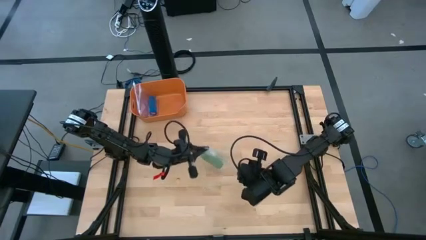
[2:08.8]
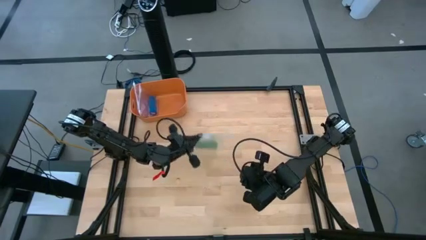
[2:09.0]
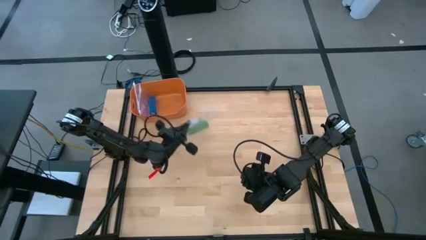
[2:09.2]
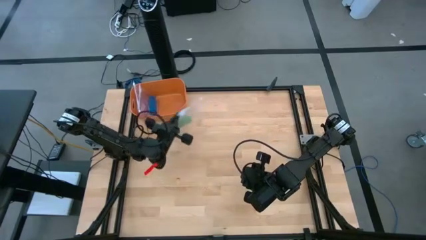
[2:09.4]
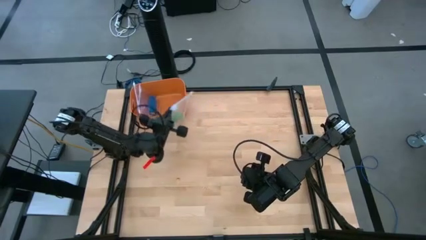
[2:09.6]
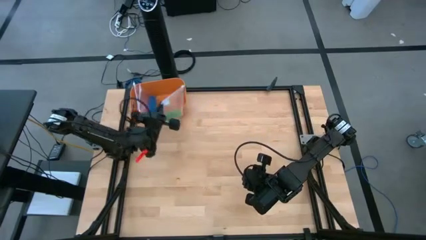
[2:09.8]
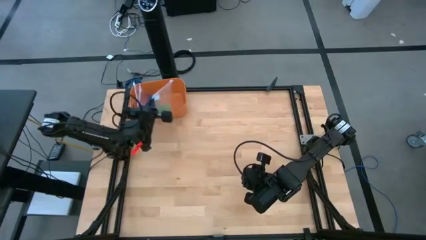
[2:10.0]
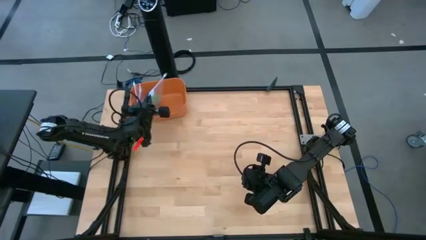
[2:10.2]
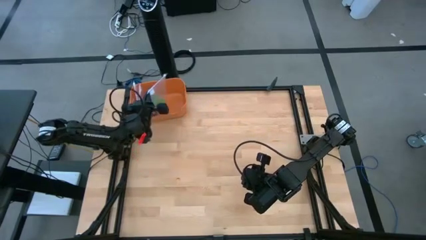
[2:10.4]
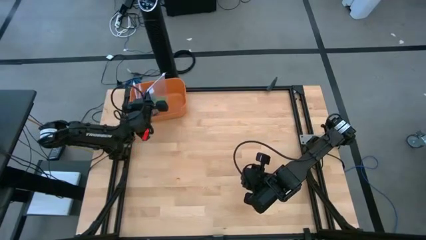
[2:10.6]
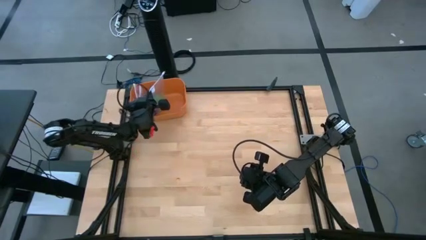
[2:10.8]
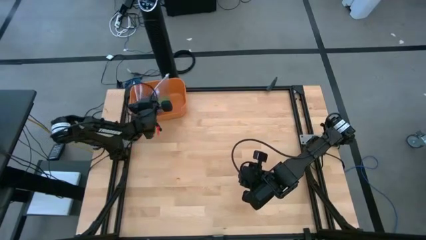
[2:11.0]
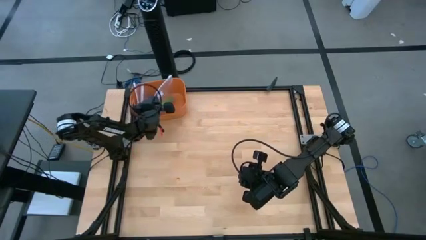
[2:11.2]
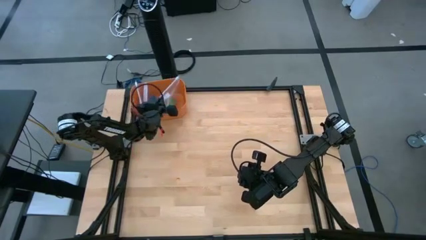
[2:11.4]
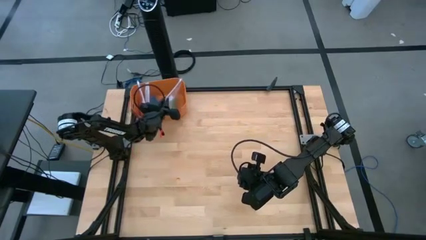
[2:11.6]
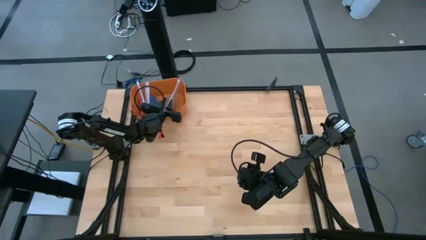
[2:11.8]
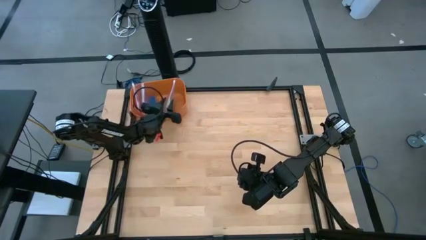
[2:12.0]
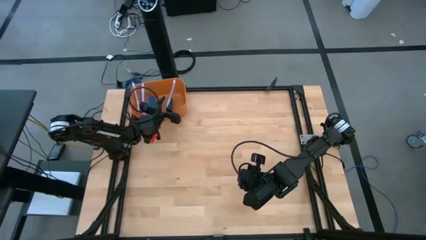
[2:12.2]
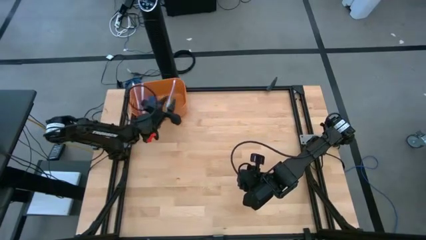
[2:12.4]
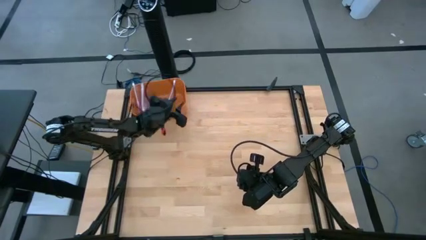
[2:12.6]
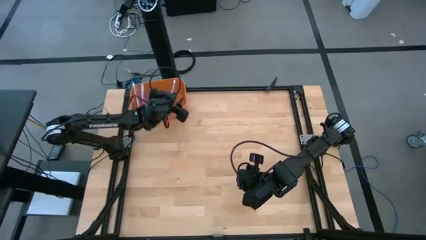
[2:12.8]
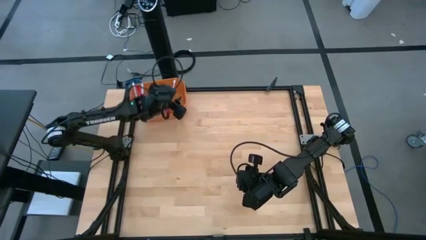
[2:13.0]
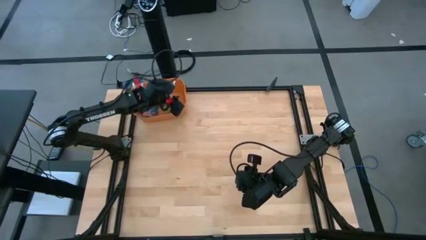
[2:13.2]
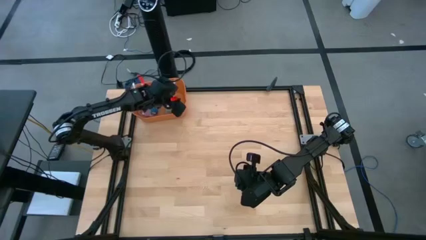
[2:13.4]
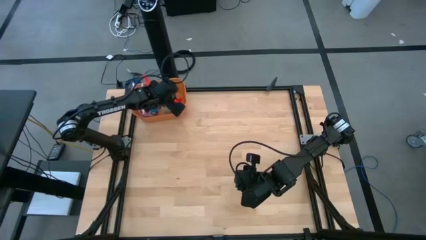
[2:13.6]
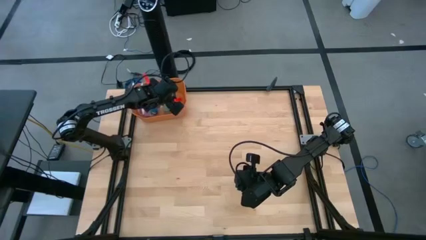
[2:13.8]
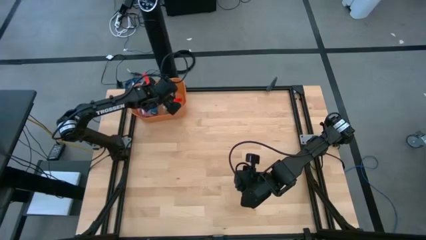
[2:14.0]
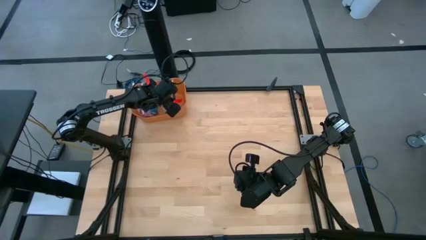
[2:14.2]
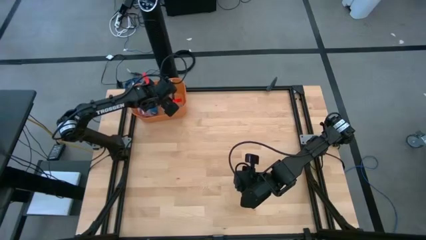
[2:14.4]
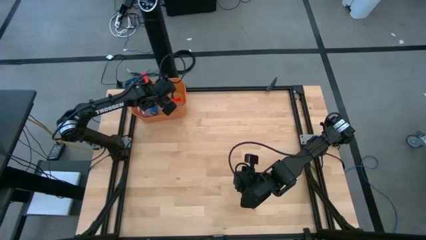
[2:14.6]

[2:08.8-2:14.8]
Task: Roll bandage
Put the transparent zip bag containing green bandage into the orange bin

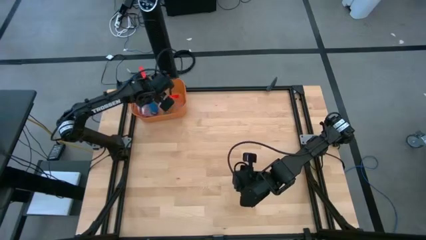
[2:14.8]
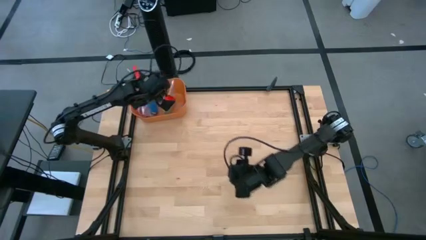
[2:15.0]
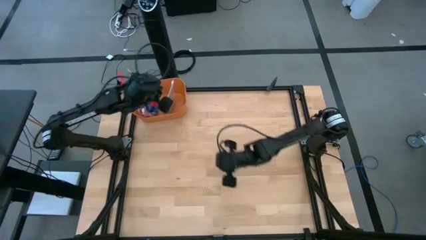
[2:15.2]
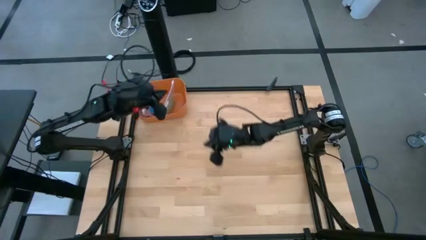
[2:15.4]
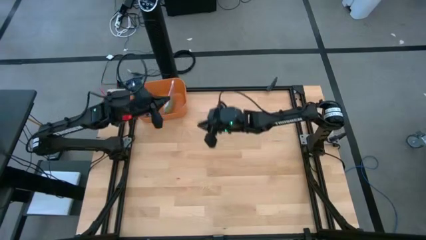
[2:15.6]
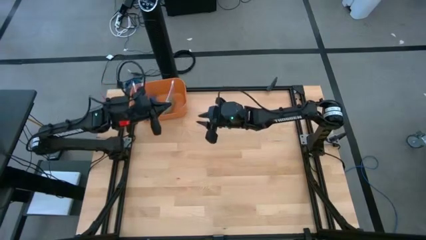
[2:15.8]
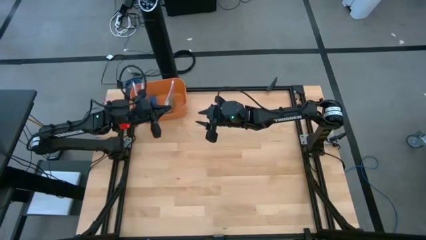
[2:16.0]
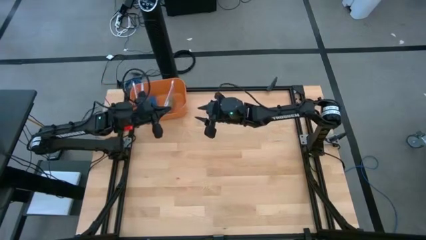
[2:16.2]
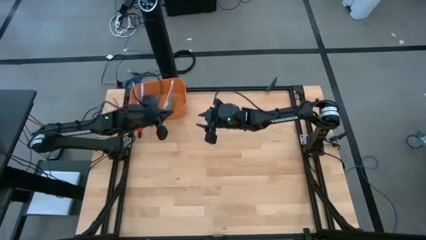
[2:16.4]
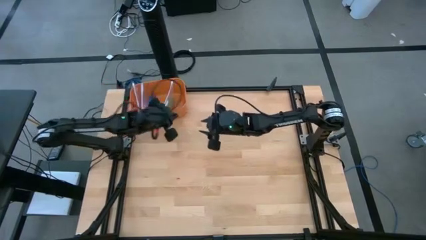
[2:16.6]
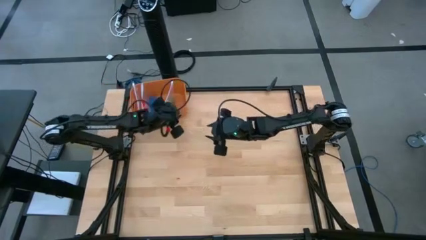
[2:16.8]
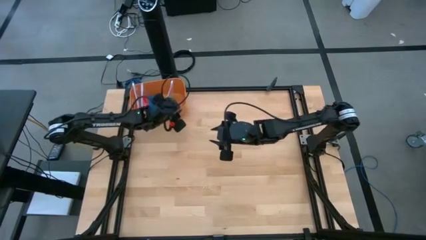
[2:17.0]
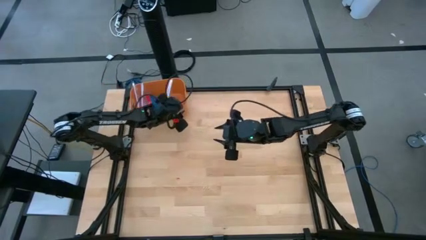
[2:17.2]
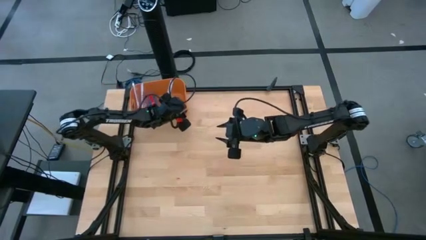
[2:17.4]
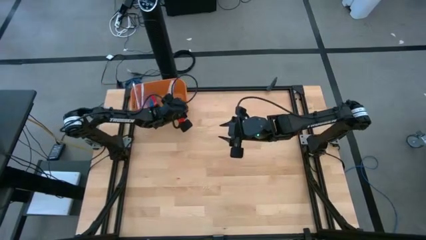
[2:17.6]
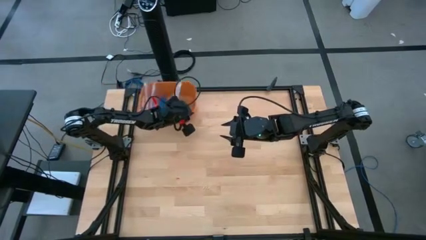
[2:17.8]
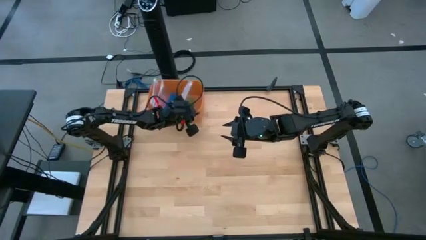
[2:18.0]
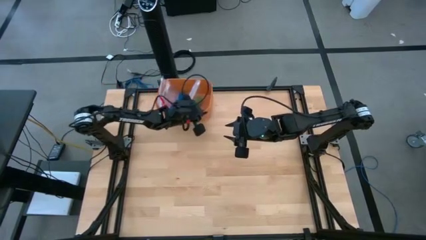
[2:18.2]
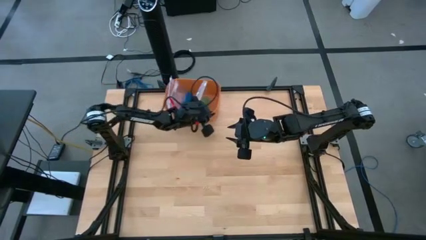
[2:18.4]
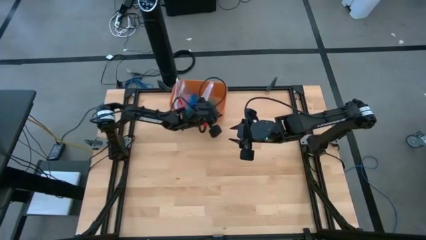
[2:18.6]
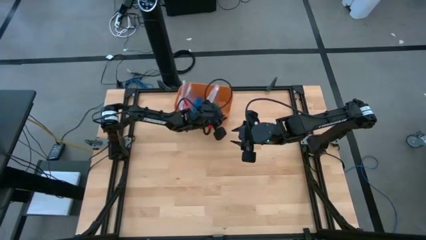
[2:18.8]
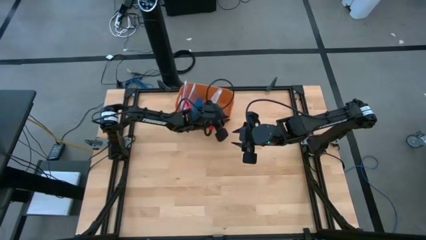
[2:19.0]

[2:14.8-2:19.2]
Move the orange bin to the top center of the table

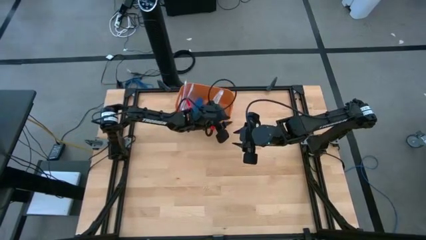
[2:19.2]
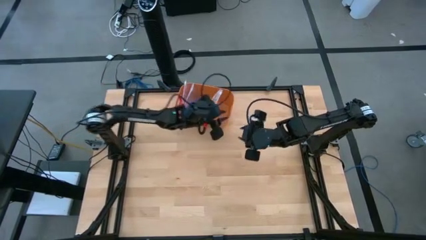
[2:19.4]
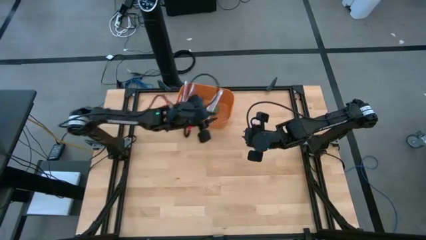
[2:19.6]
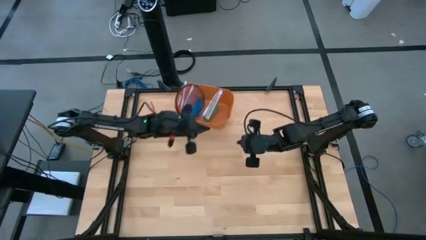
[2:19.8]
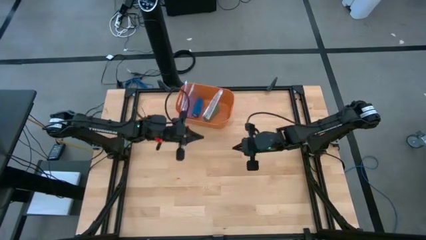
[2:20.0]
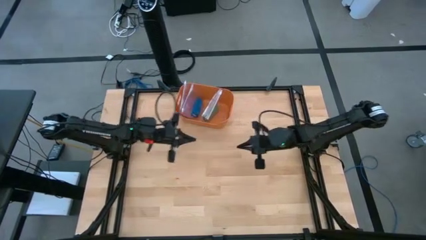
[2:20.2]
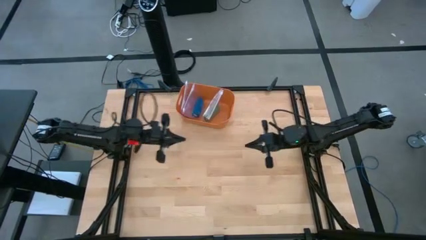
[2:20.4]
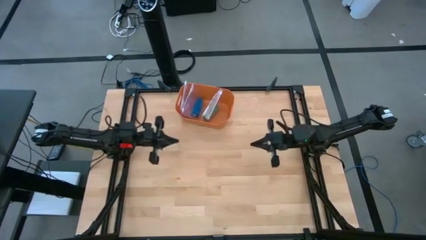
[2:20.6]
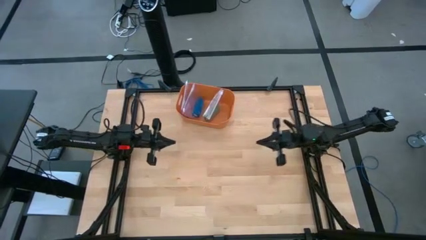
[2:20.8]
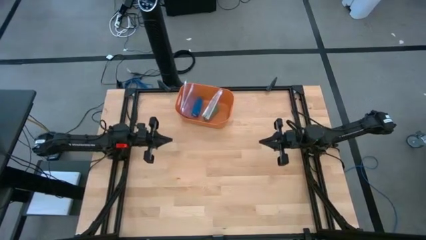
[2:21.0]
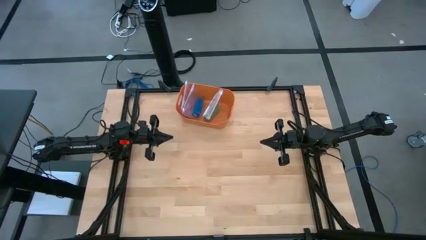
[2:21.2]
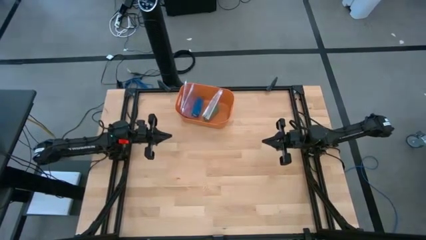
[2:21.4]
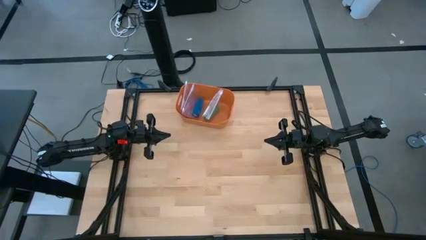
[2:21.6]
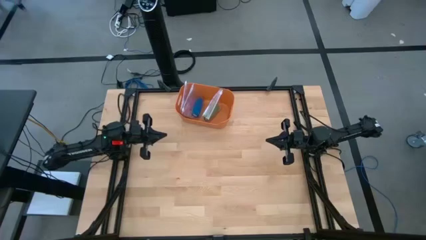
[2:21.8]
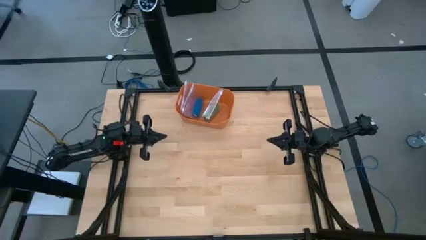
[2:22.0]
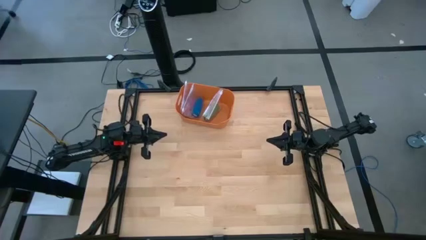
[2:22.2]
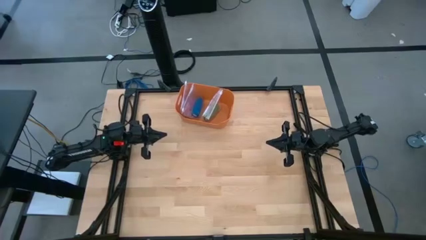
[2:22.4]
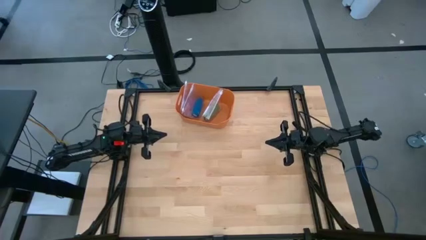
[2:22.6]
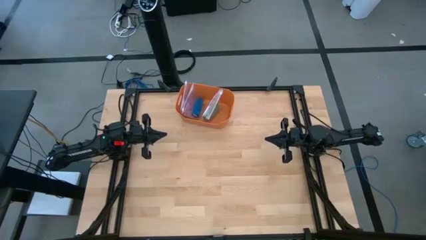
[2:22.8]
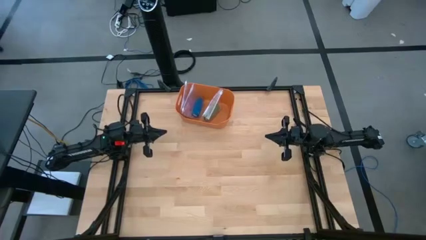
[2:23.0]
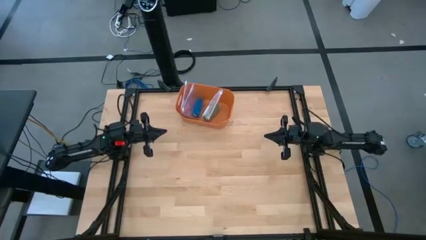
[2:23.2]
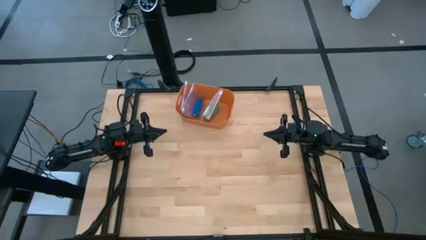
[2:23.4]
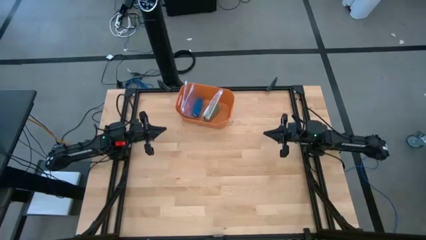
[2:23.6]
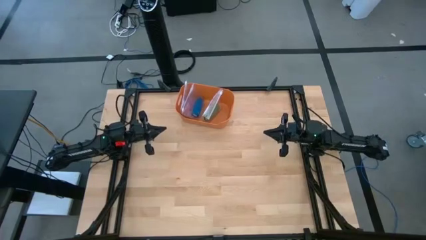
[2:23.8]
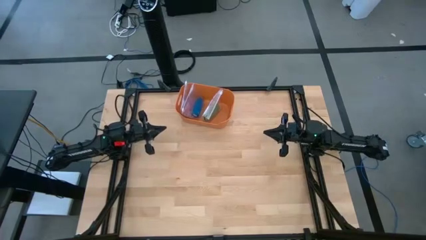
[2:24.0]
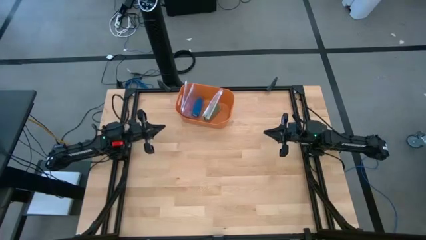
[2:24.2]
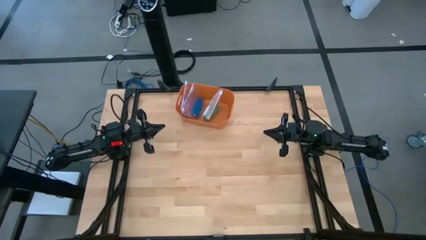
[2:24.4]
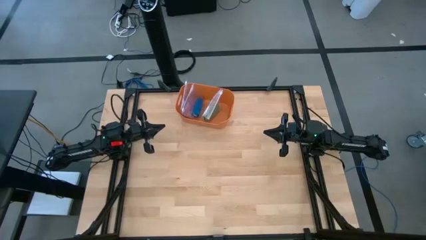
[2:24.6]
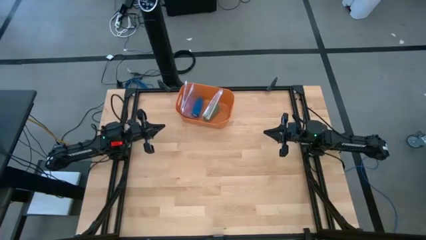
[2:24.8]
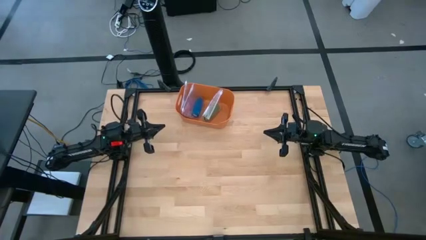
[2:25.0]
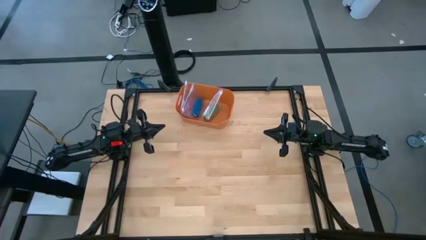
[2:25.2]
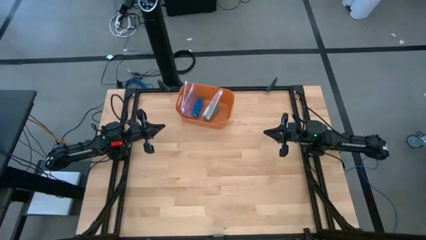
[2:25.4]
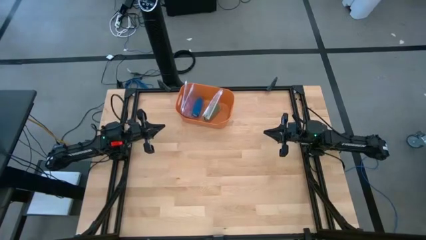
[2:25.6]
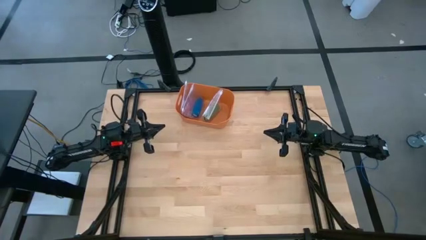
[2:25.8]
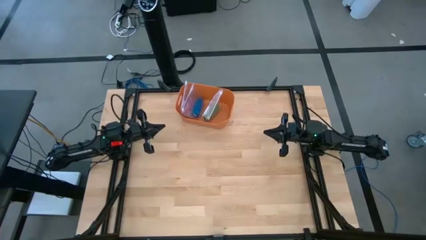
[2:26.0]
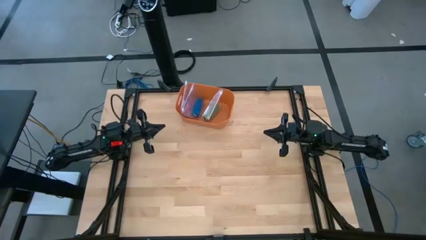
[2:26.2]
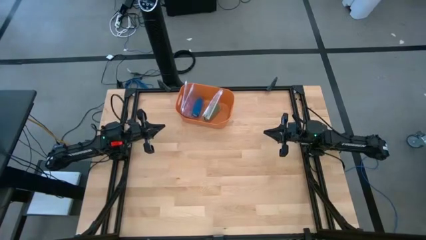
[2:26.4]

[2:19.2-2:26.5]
Return to Home Position
